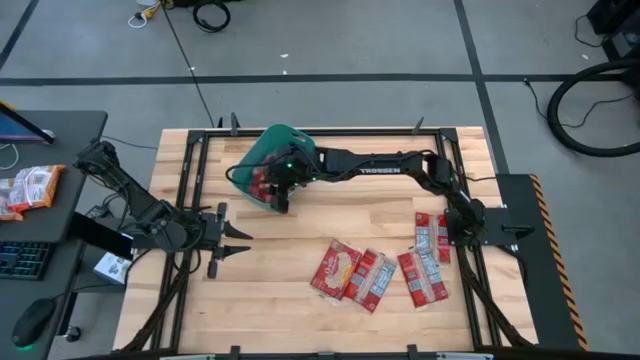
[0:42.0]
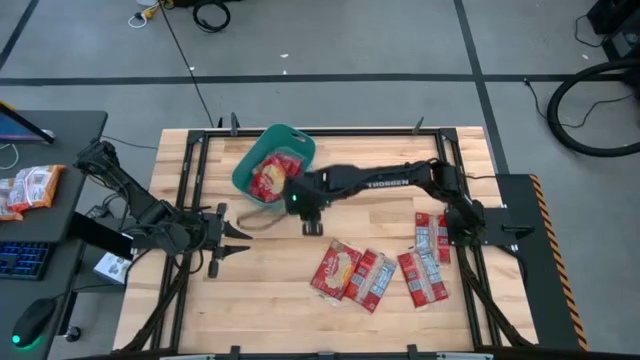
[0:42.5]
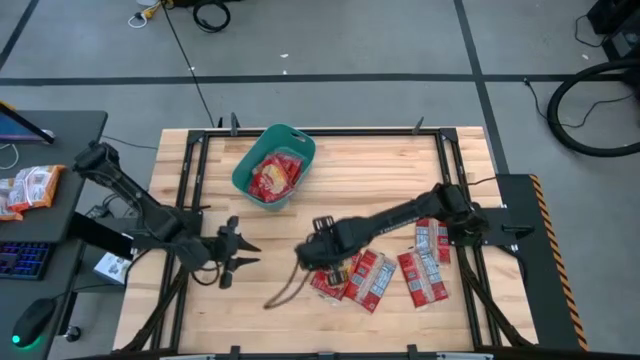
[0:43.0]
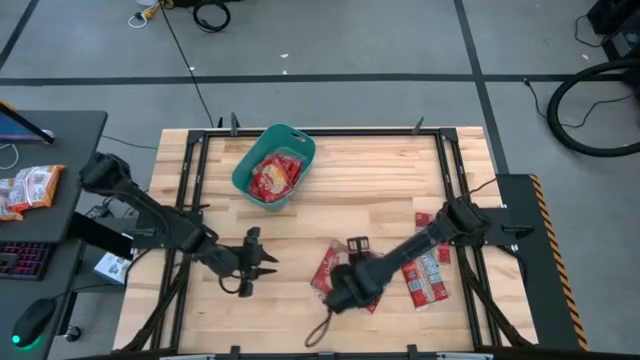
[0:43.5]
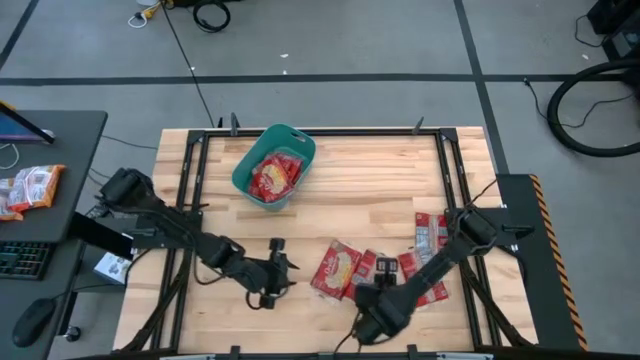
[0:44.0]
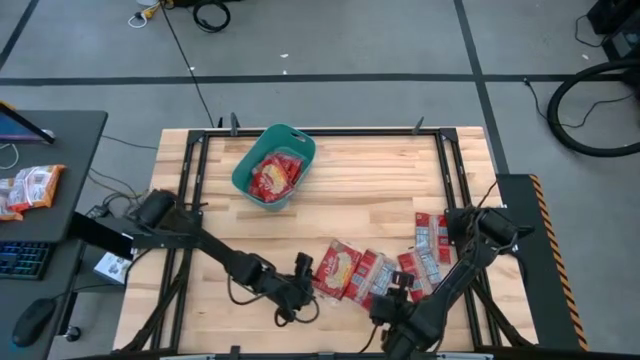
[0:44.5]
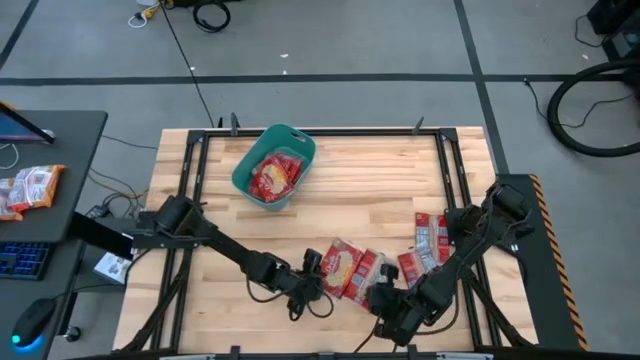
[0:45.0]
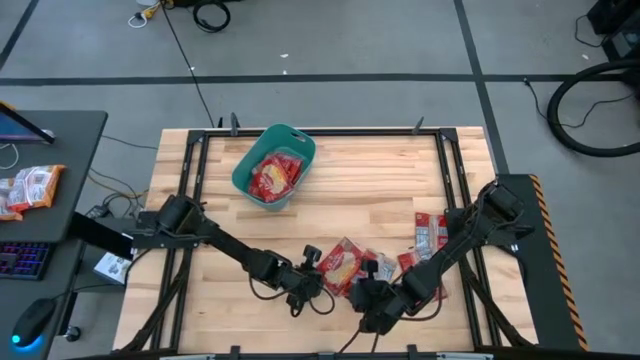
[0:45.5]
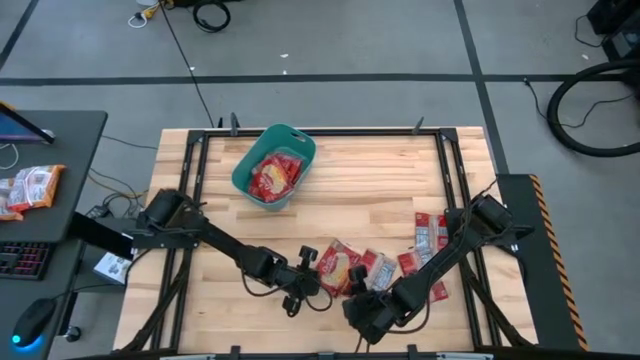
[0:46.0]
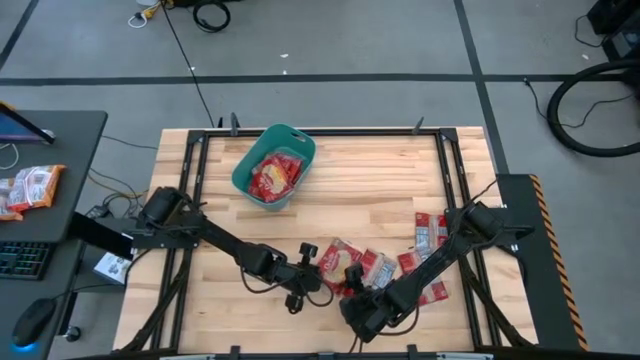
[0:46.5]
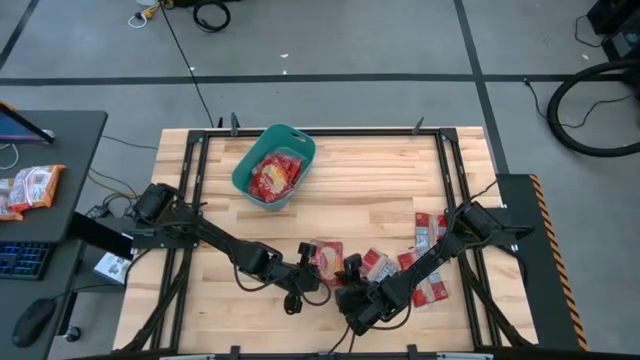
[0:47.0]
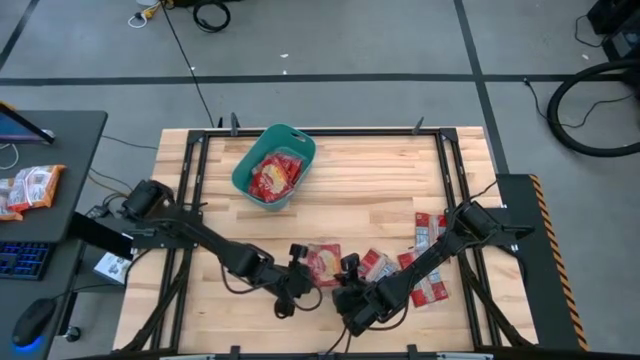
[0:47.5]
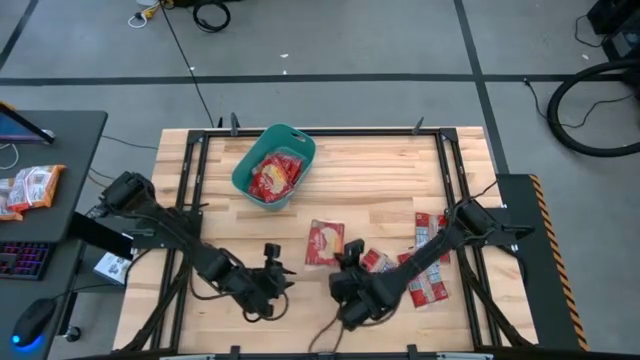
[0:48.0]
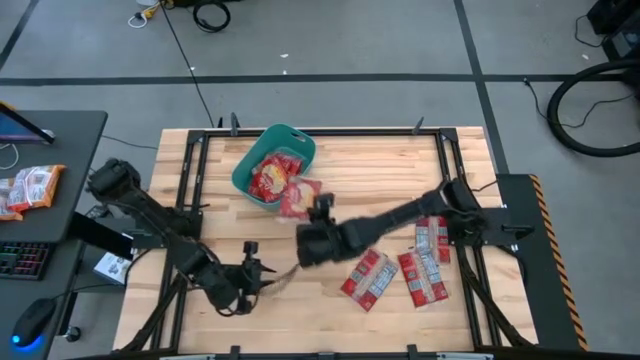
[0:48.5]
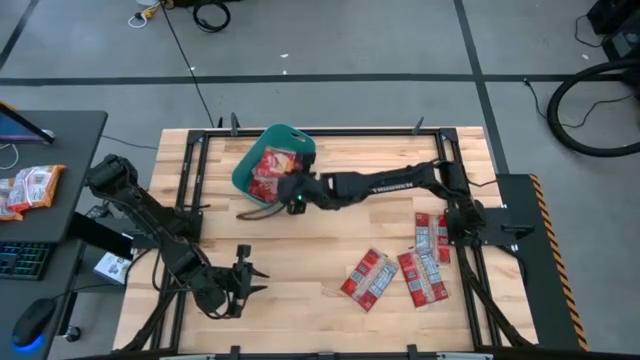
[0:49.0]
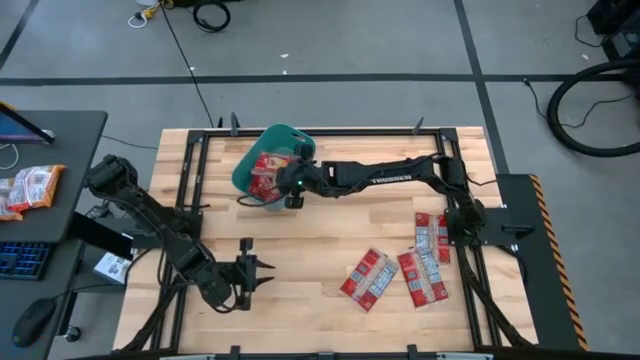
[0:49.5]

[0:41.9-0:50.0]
Task: Sort popcorn bags into baskets
Put the popcorn bag into the green bin

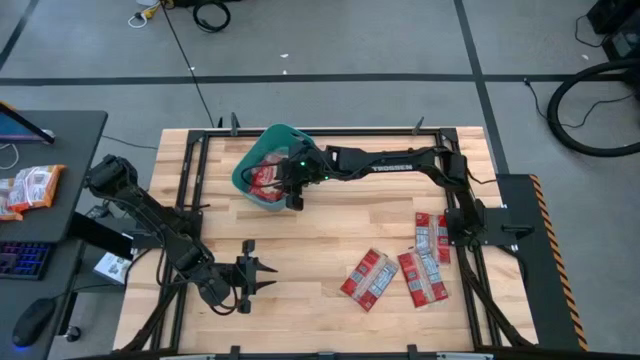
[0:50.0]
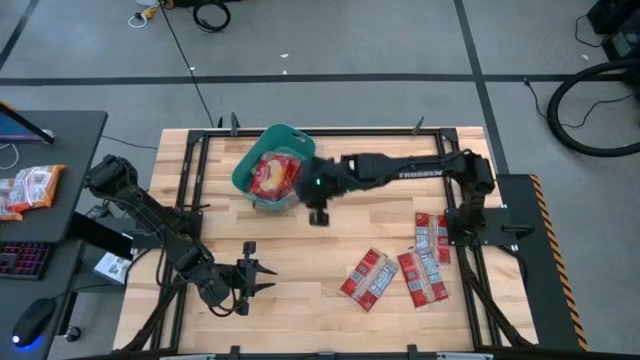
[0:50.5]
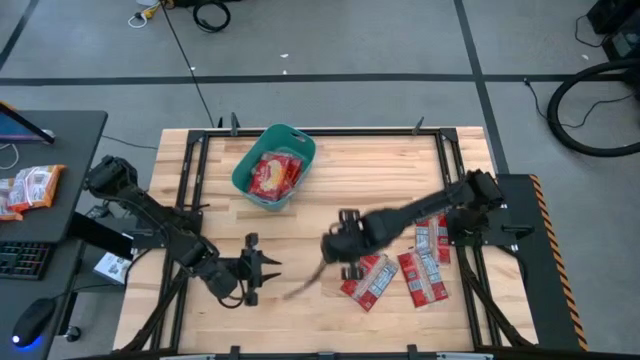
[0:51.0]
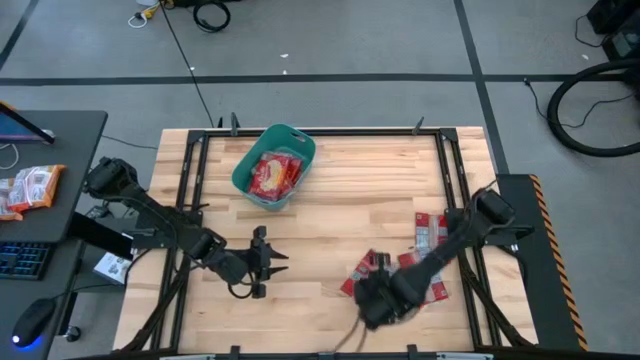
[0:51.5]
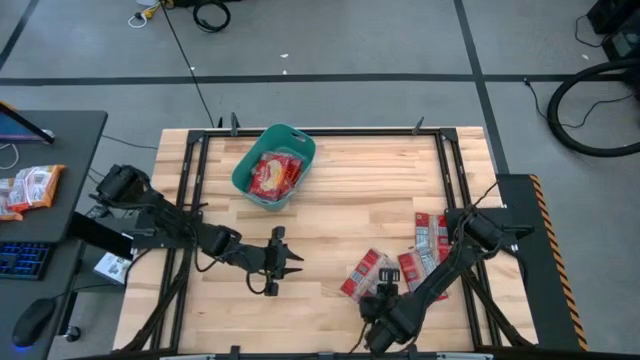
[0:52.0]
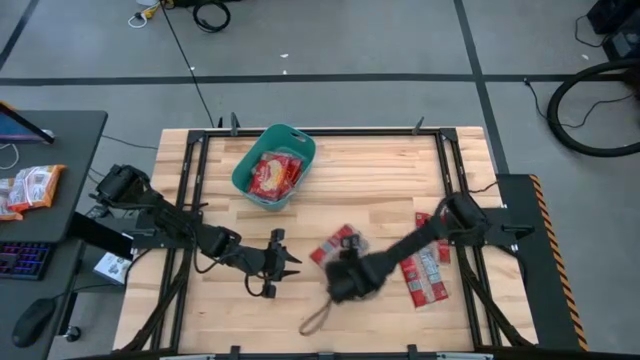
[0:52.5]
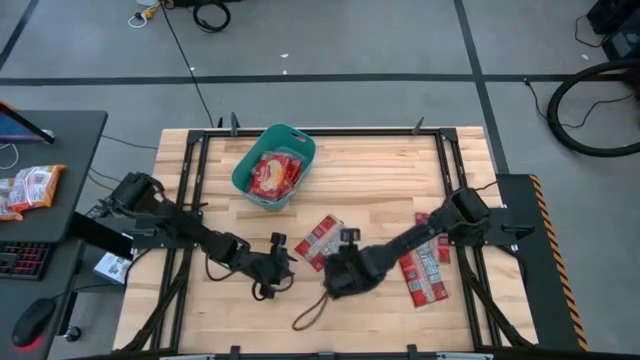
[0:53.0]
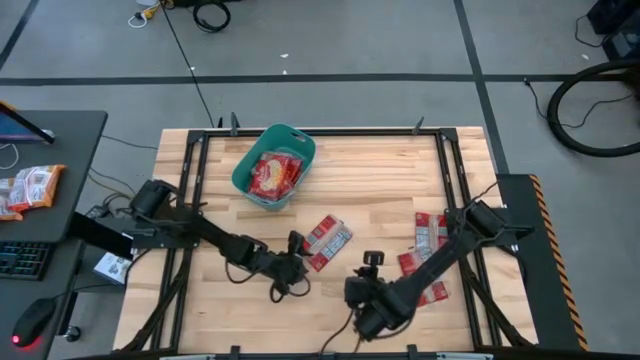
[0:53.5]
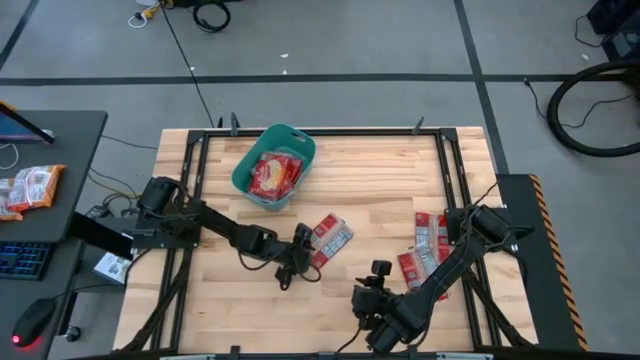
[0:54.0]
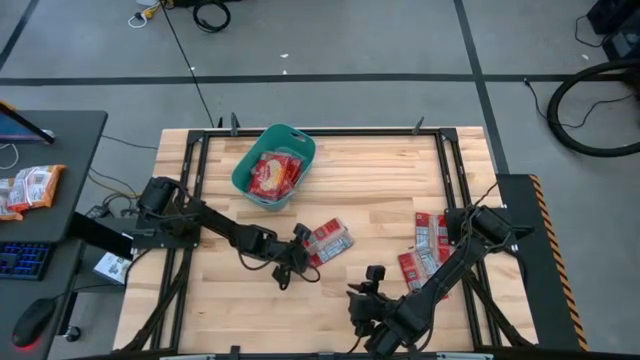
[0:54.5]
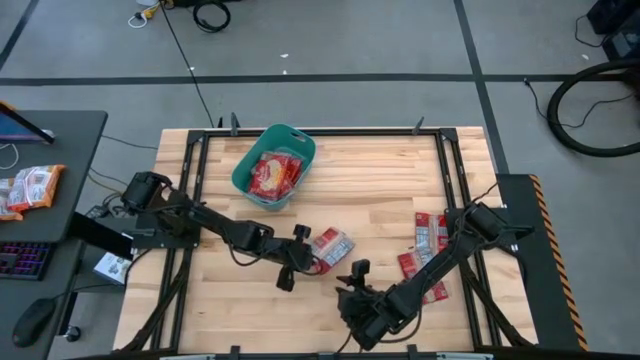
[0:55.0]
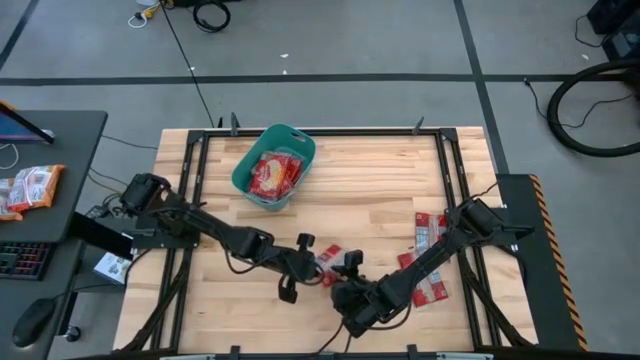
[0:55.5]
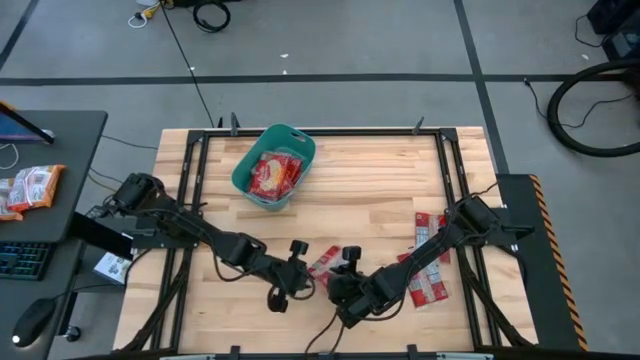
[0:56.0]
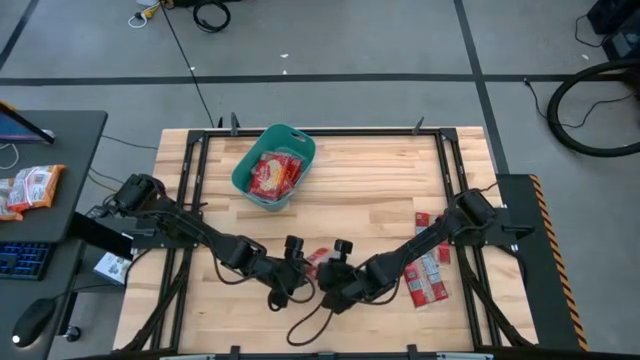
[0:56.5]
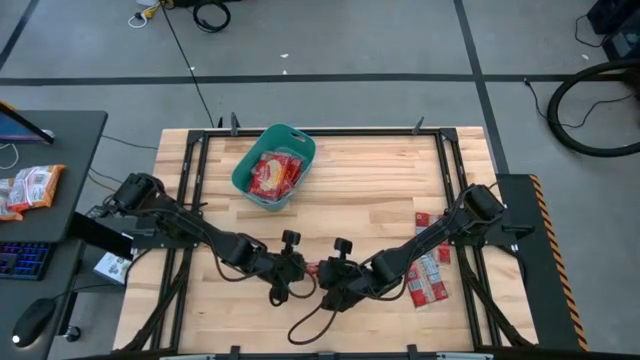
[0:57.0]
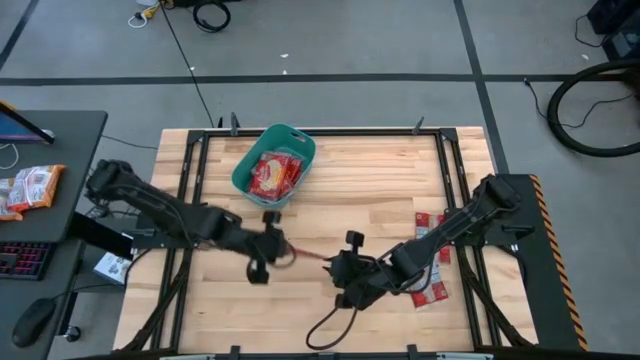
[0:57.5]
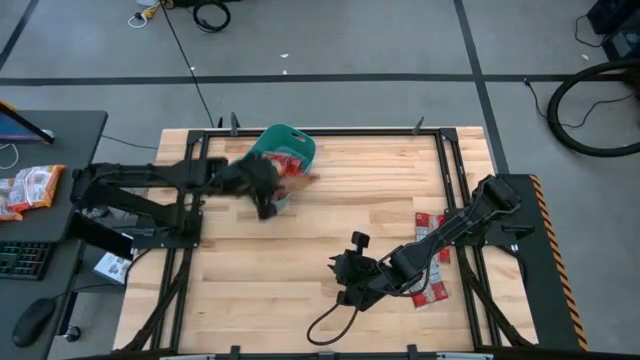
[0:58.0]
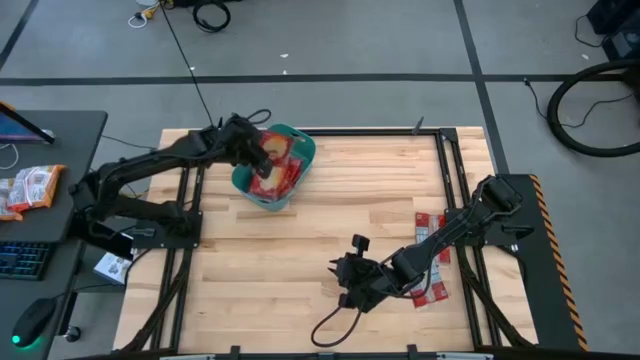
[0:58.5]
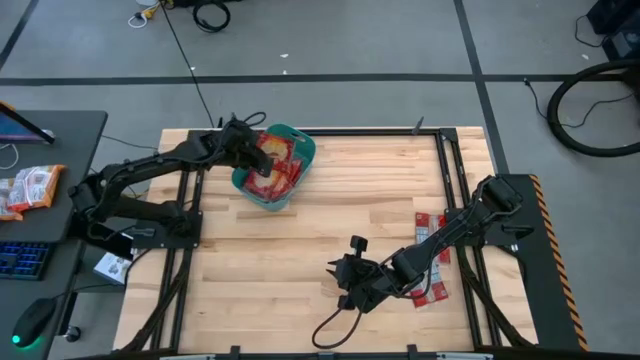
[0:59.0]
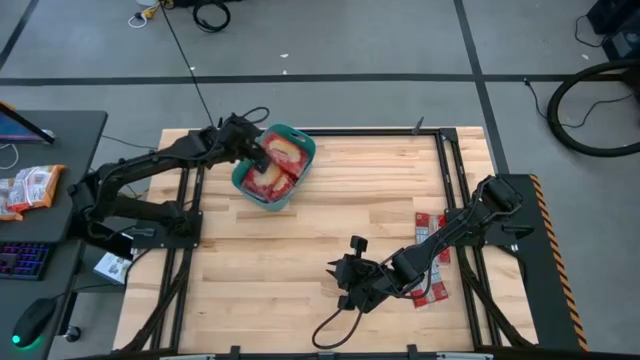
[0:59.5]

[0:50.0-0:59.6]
Put the popcorn bag into the green bin

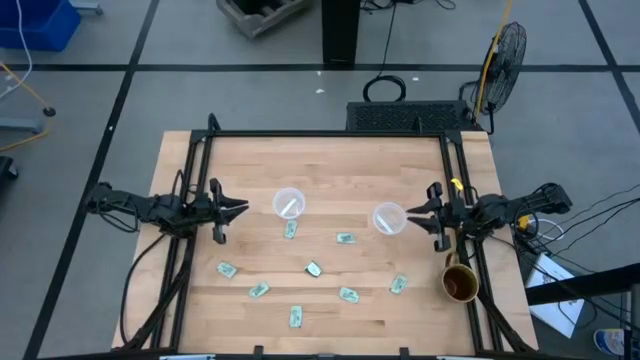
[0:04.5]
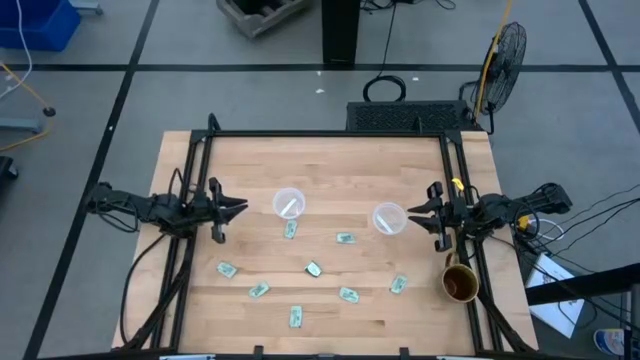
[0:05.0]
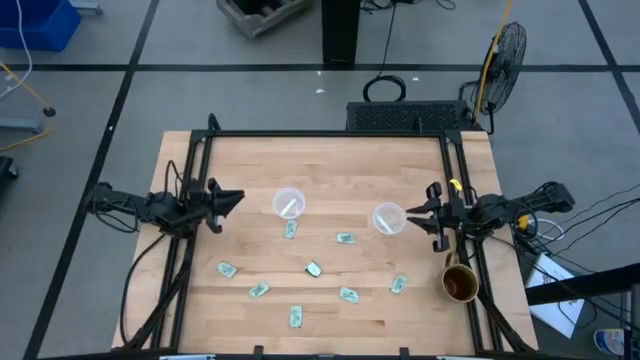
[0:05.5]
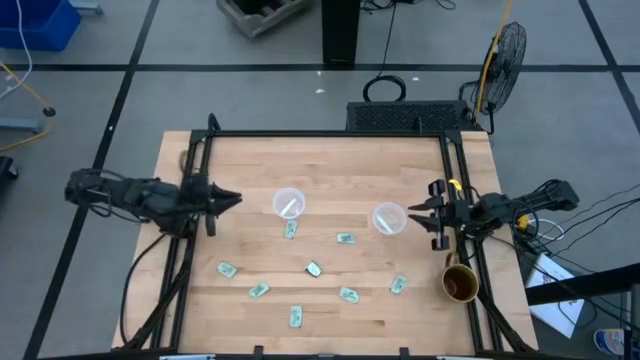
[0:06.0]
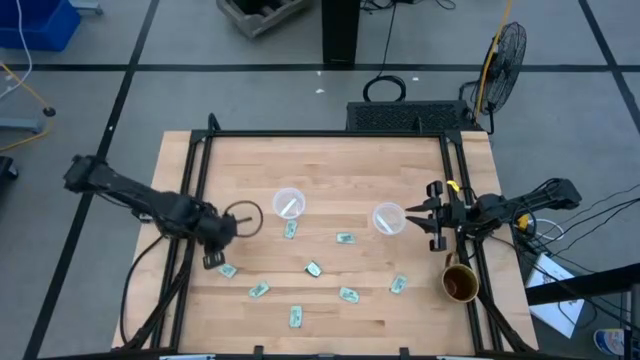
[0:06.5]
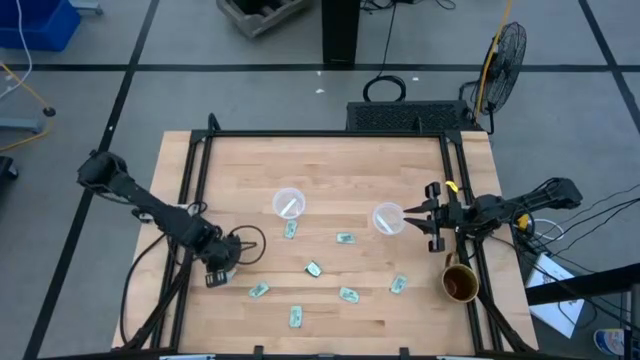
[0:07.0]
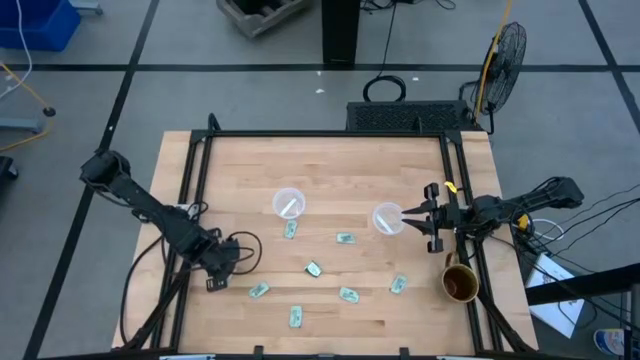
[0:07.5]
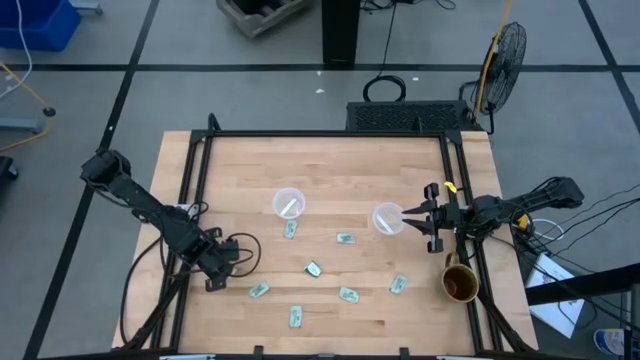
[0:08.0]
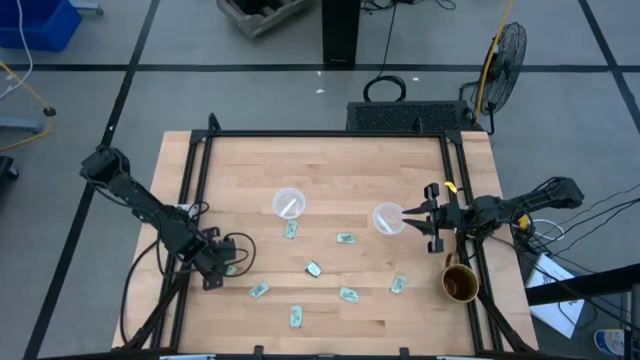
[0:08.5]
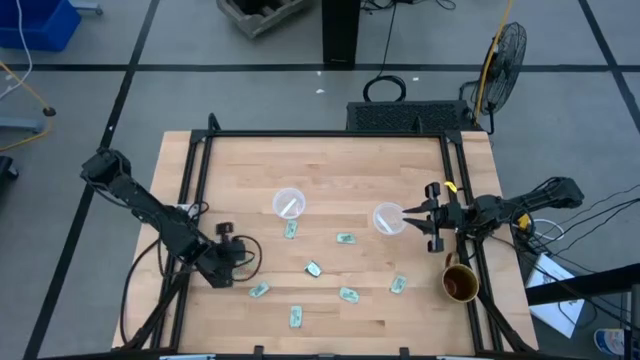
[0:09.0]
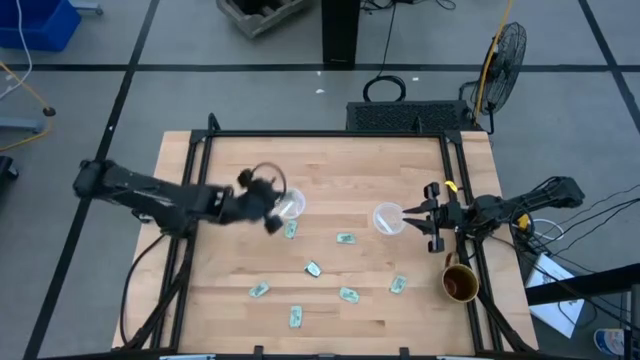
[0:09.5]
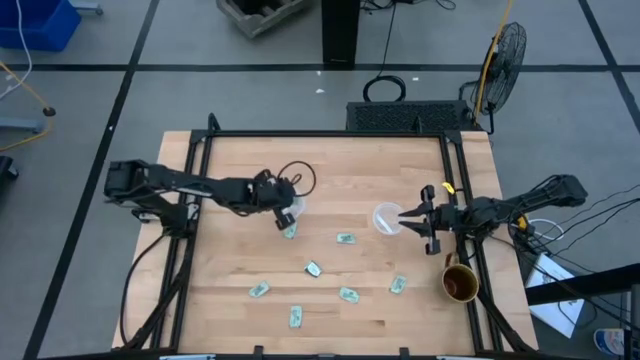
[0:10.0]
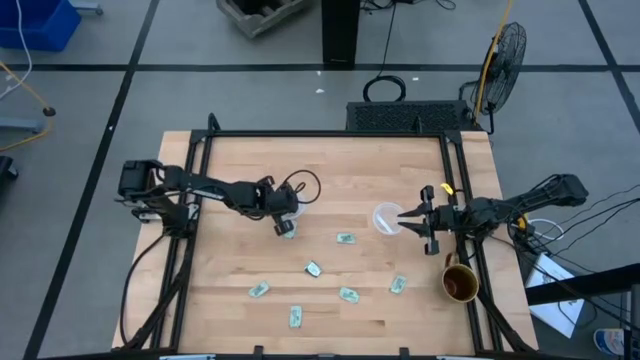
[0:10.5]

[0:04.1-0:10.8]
Task: Pick and place Stevia / Truvia into bins
Put the stevia packet into the left container
